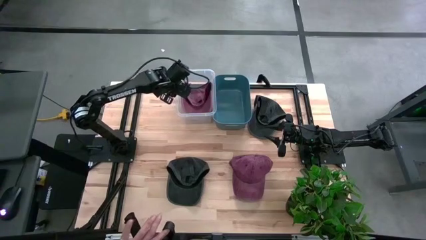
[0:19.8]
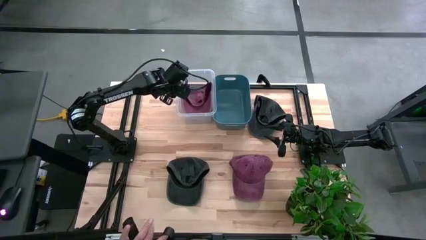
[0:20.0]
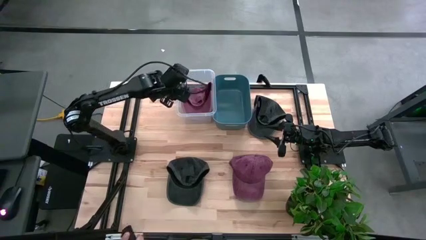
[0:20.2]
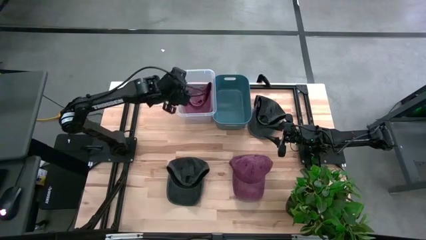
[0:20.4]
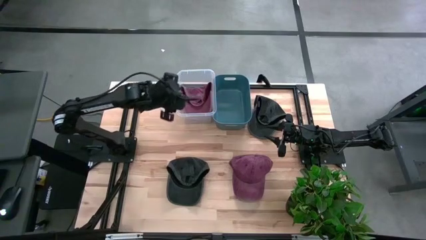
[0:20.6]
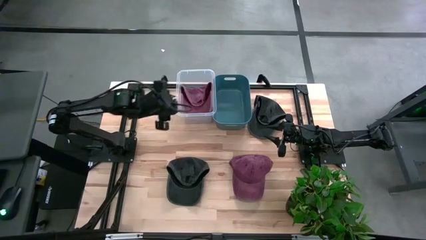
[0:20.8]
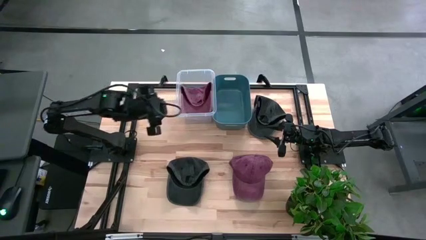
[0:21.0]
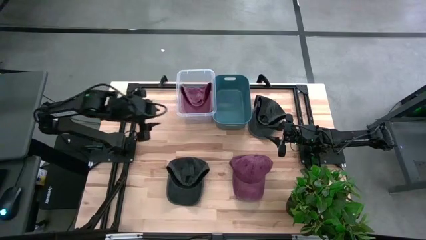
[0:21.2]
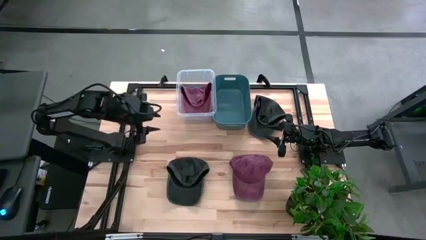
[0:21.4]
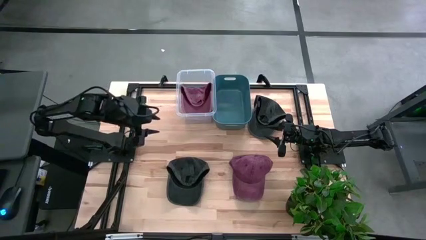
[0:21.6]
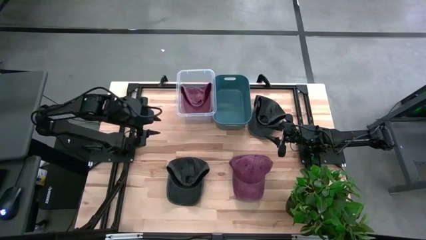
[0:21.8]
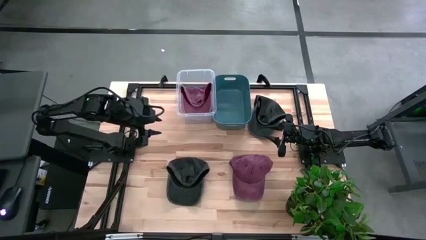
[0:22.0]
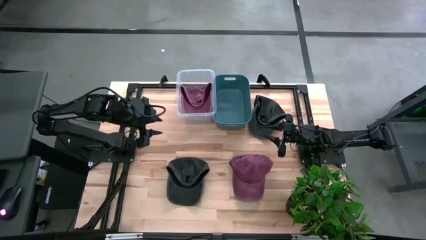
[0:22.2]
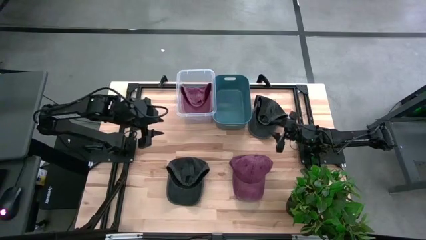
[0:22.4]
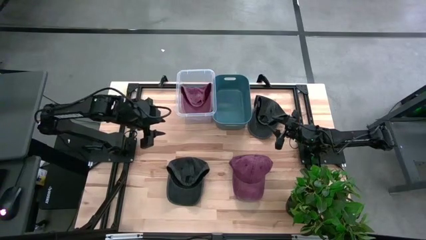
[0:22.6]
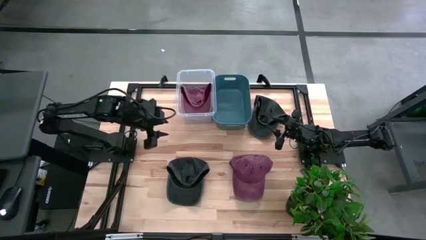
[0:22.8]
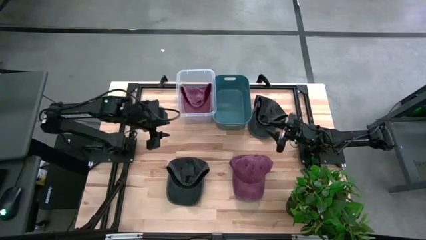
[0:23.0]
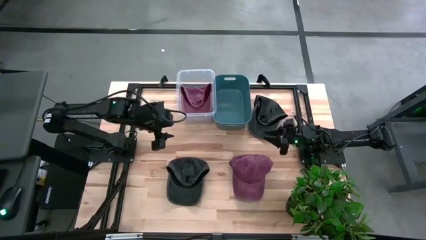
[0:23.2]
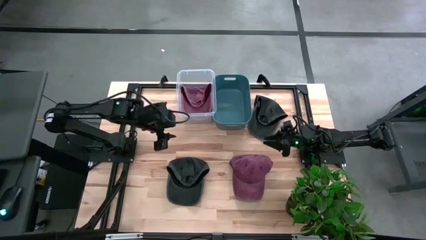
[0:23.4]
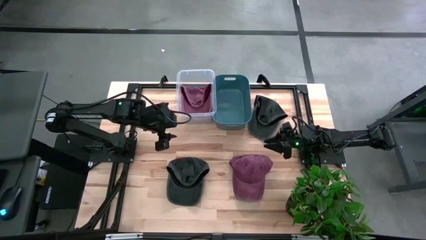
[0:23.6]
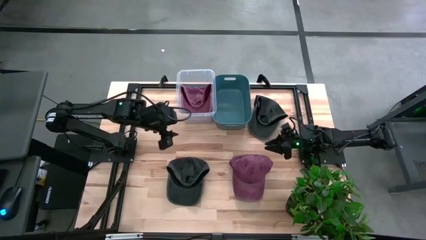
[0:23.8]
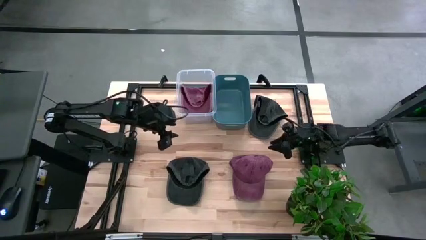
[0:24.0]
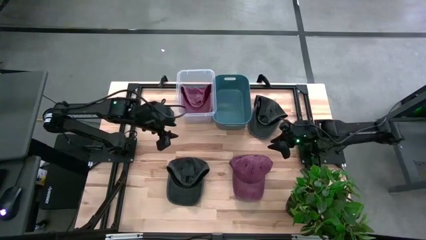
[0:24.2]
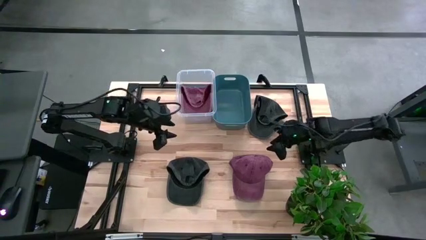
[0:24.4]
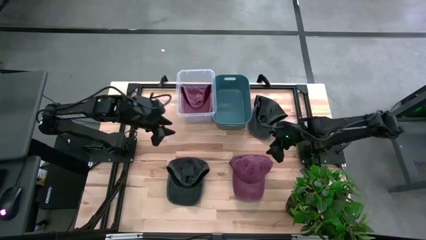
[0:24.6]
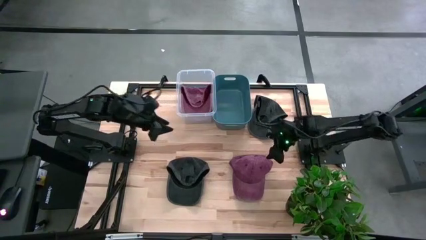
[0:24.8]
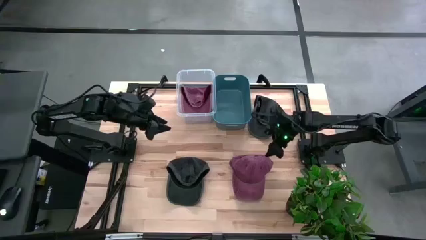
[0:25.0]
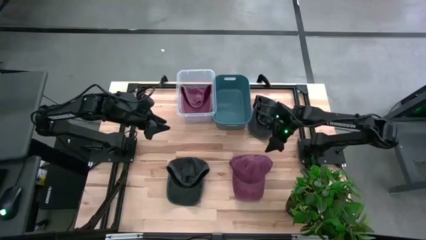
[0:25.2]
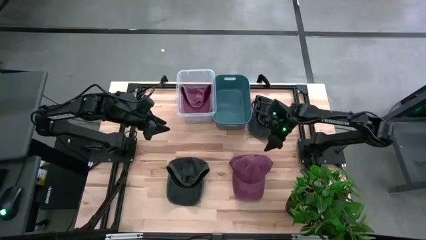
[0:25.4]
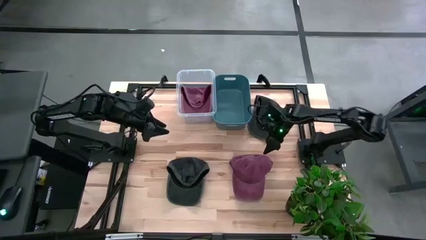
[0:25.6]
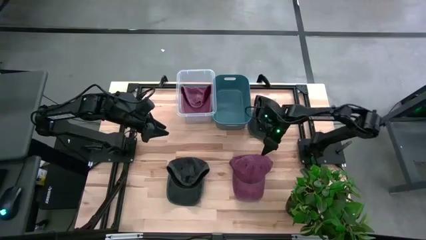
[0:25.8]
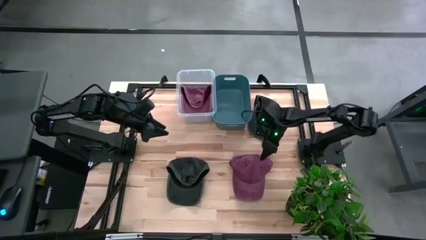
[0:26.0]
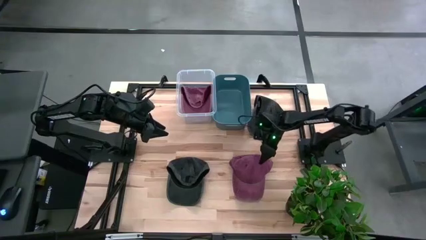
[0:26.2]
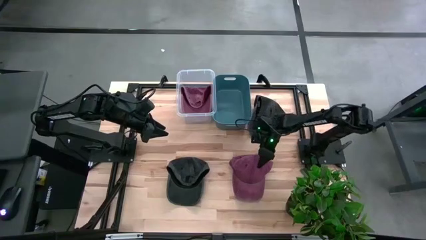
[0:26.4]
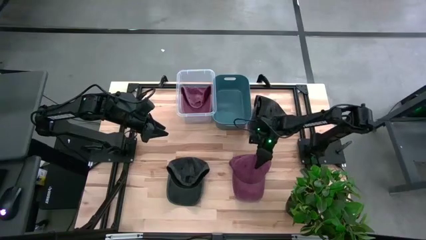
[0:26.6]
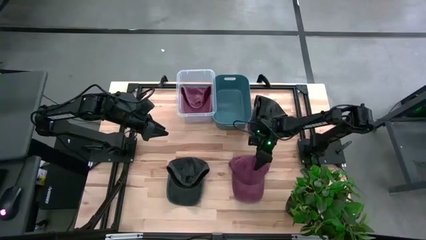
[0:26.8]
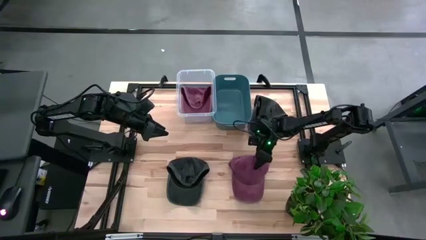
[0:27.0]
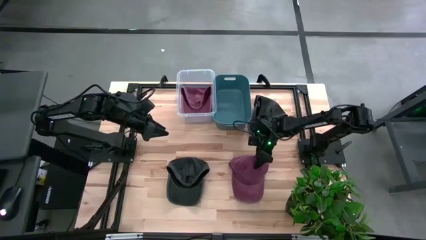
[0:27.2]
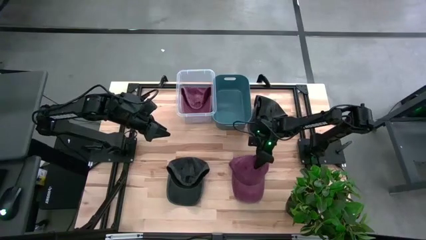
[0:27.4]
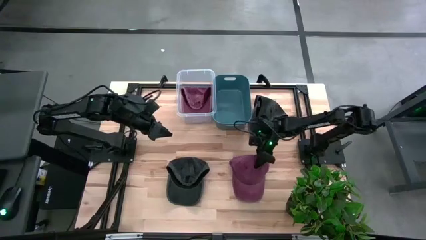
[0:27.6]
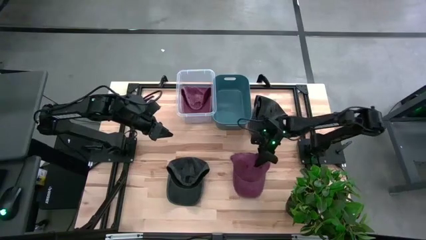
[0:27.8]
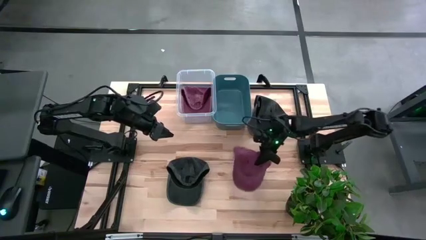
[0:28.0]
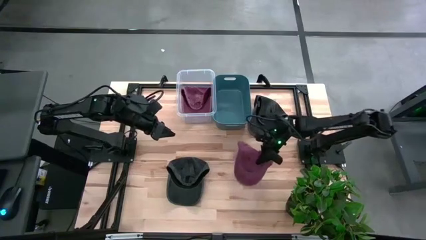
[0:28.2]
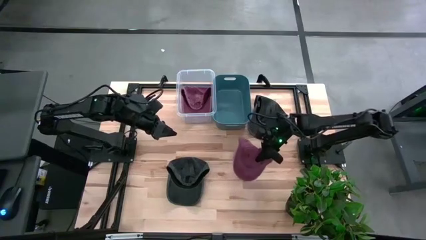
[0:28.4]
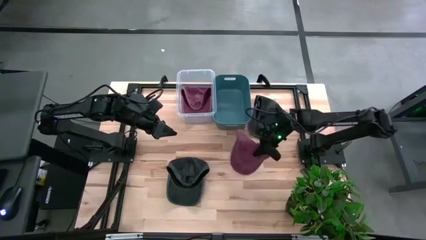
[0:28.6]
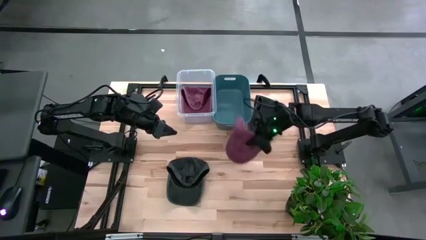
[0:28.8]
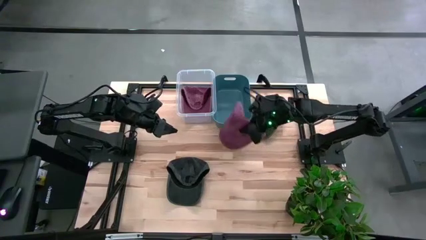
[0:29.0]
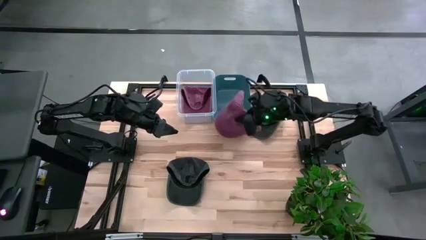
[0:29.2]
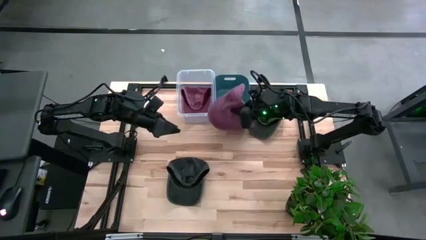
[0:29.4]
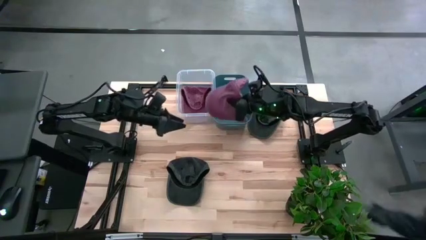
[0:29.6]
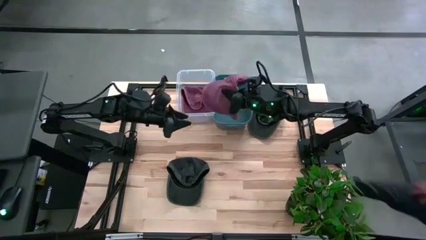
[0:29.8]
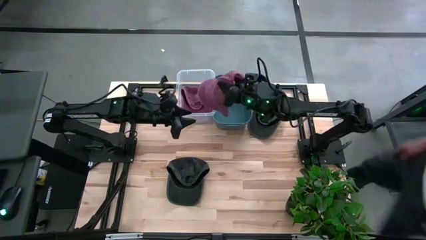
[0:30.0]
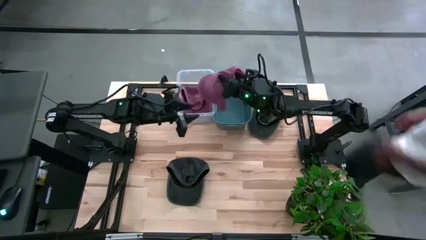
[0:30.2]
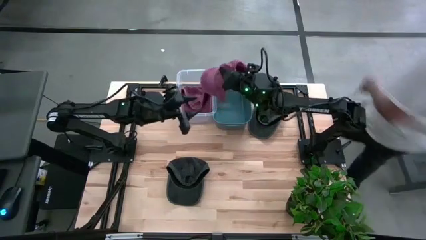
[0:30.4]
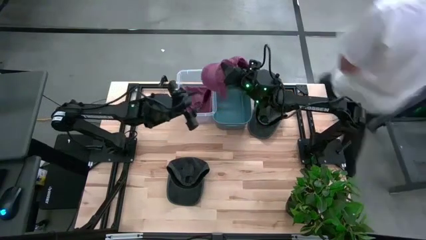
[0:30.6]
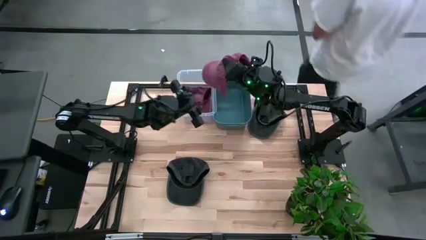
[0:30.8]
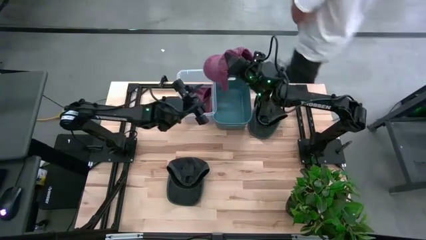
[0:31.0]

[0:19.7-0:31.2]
Task: Pick & Place hat
Put the red cap into the transparent bin
